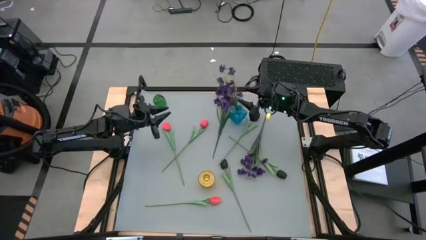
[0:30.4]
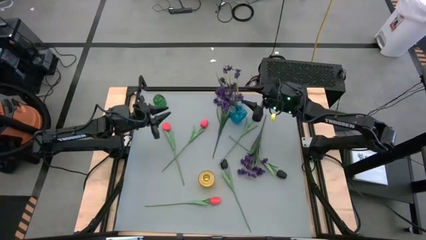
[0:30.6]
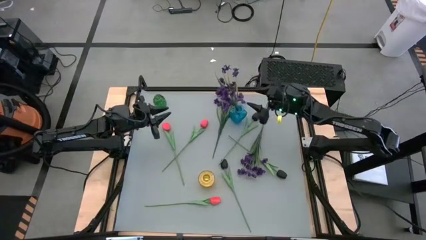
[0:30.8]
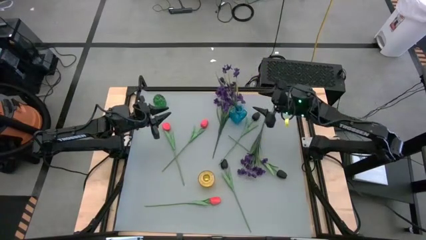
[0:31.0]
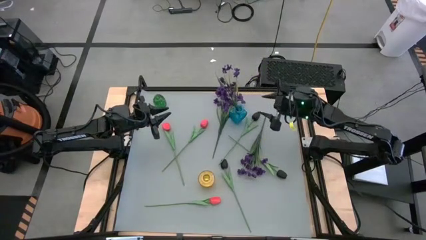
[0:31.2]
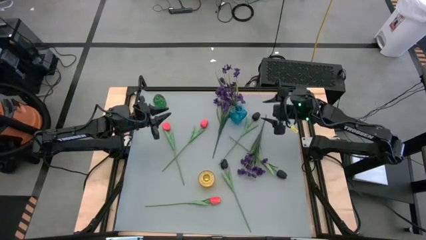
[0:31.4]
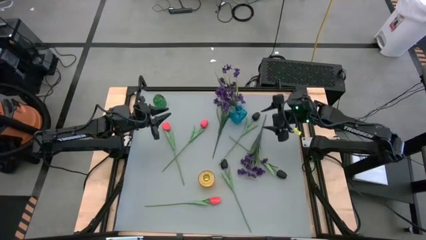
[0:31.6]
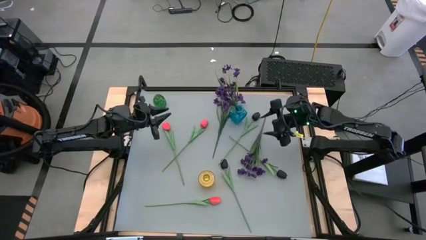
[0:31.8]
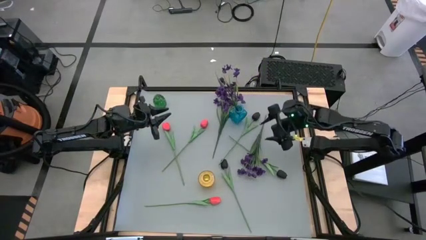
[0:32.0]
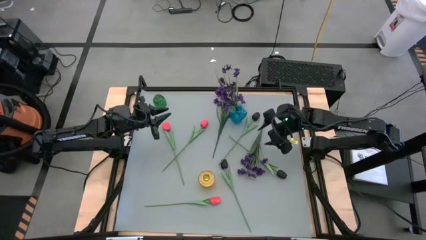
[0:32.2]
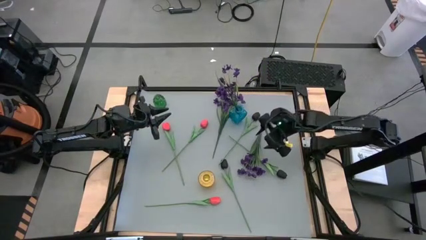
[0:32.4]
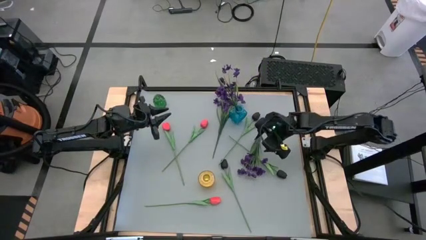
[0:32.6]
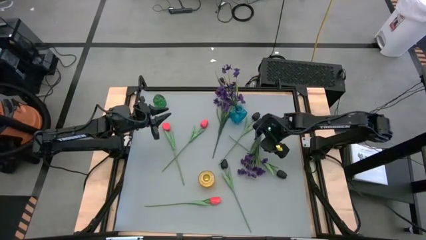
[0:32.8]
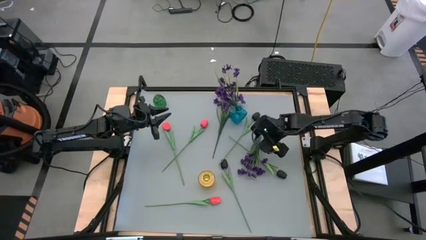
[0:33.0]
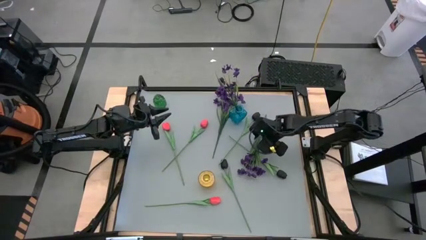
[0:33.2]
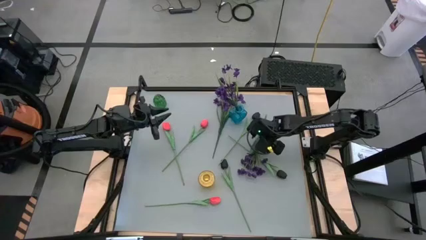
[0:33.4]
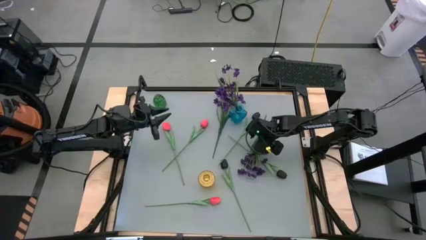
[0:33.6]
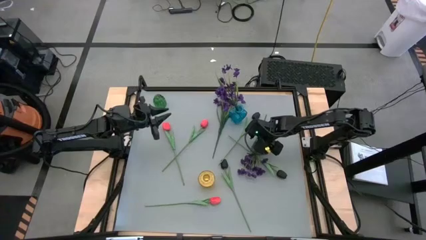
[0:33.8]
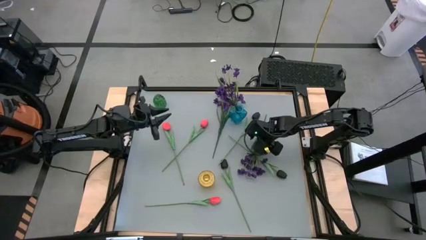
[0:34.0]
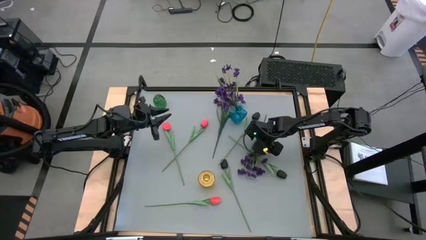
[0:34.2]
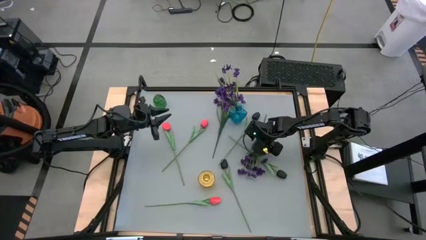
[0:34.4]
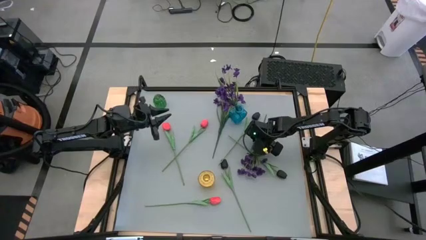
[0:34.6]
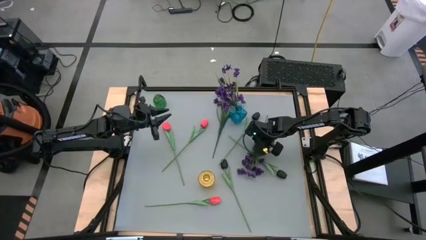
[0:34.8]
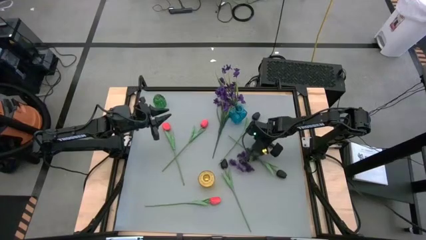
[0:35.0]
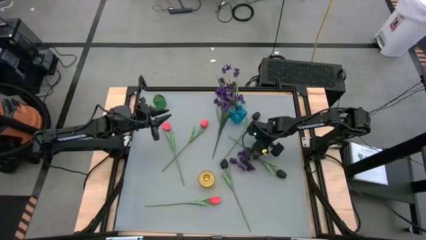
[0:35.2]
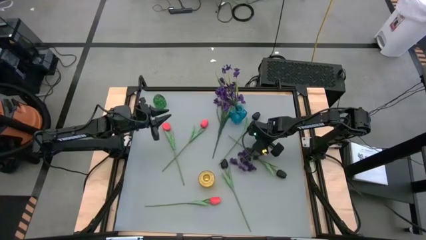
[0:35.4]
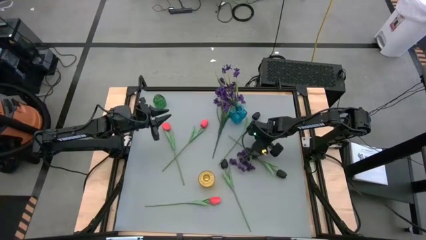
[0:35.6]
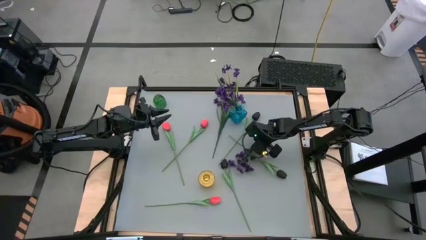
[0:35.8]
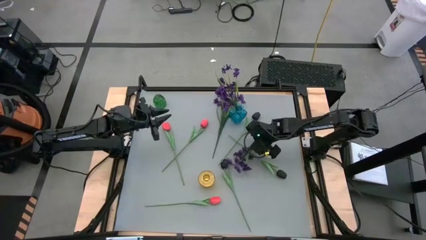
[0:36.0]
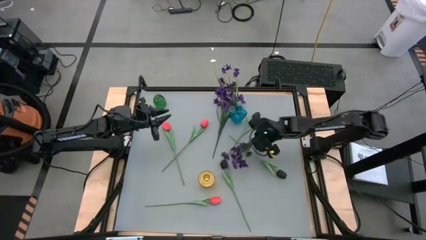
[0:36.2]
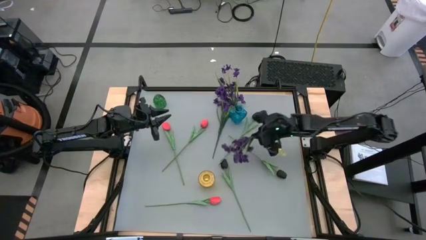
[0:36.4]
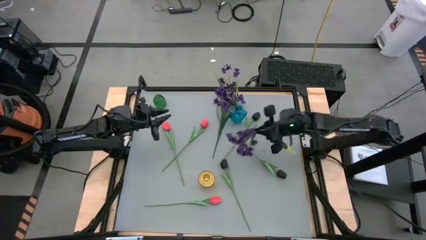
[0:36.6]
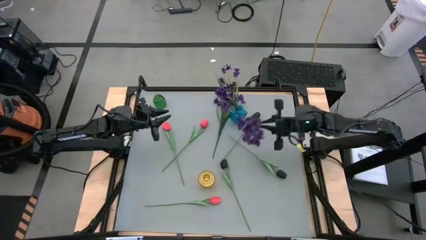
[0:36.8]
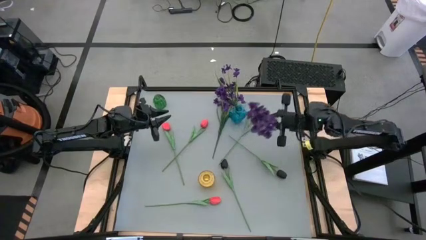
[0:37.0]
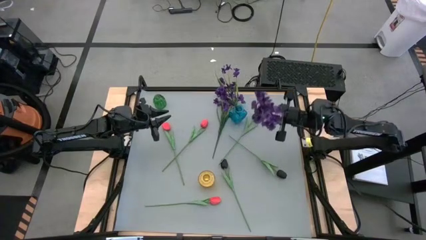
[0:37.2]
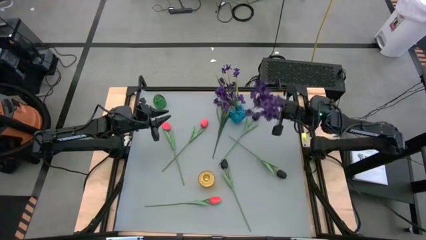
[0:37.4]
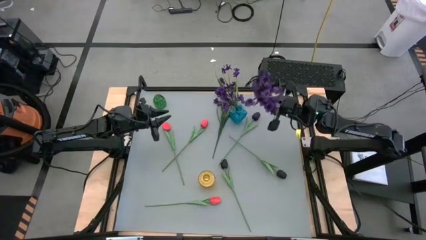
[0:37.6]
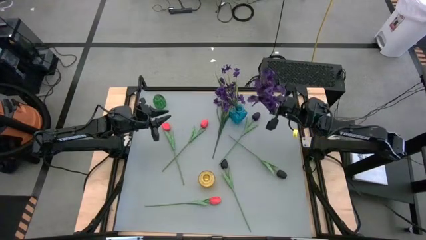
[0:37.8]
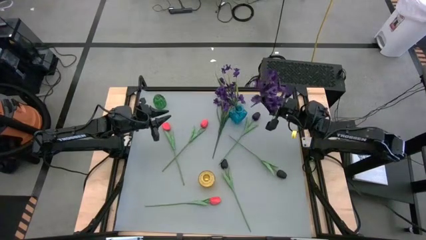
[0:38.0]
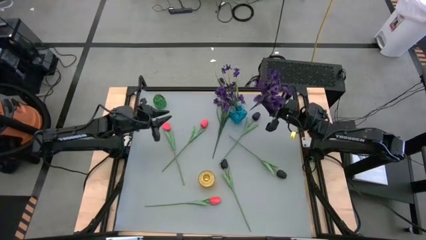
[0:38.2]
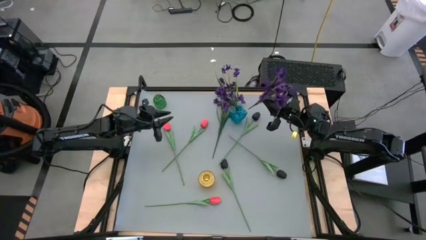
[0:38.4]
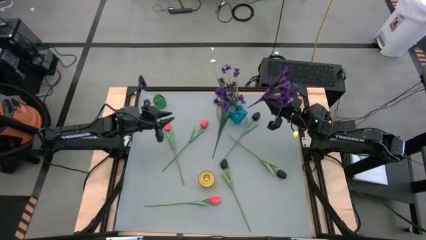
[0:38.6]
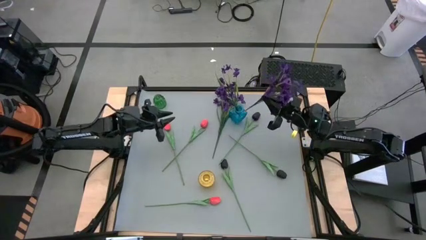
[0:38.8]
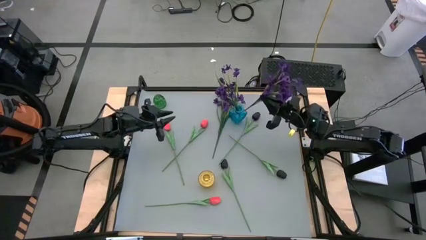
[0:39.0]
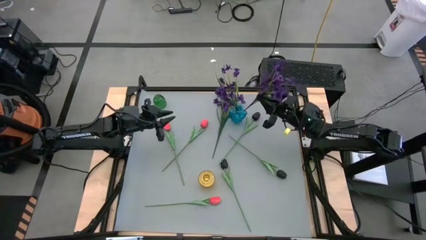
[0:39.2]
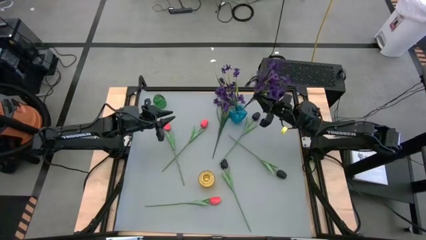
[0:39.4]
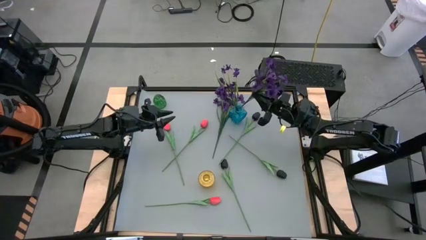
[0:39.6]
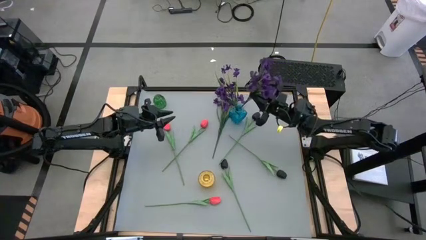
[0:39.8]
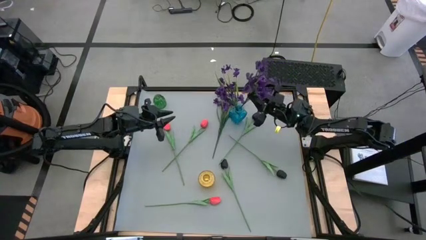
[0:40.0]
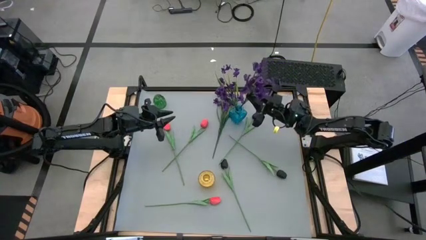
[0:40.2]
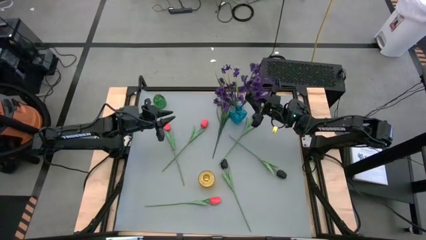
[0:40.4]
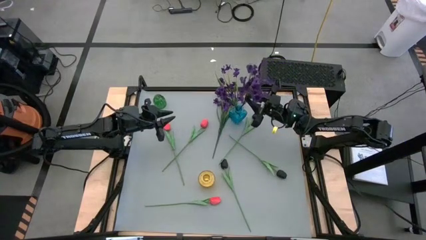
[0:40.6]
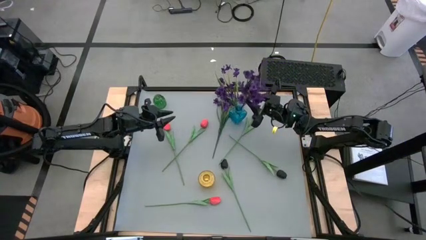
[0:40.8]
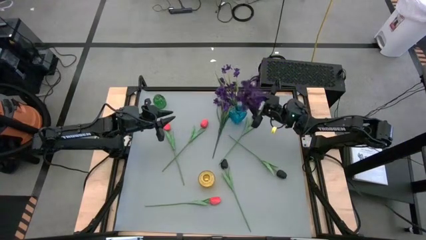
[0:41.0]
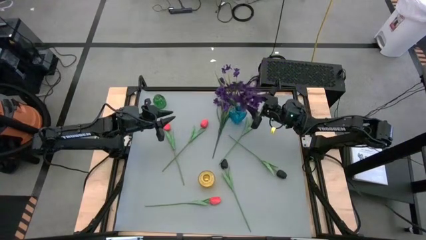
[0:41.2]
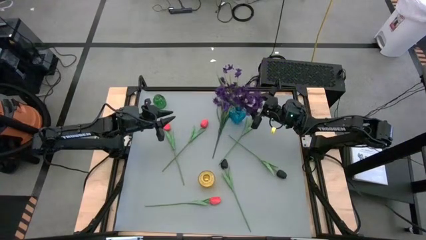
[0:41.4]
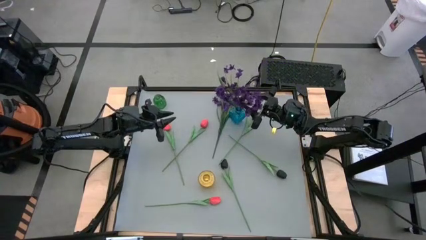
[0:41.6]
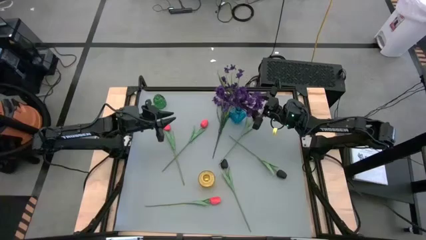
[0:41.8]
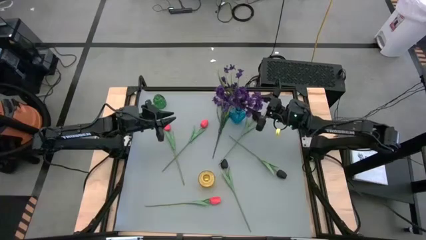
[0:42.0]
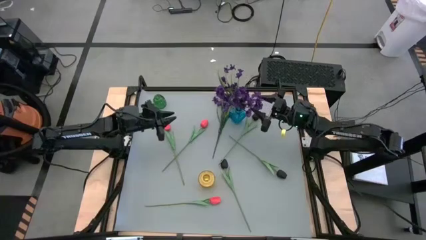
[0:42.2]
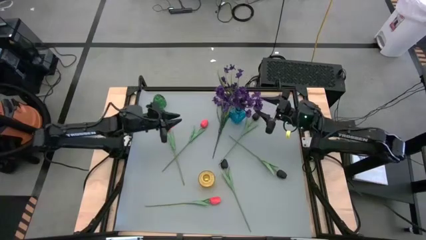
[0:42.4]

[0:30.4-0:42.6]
Task: Sort flowers into vase by color
Put the right purple flowers into the blue vase

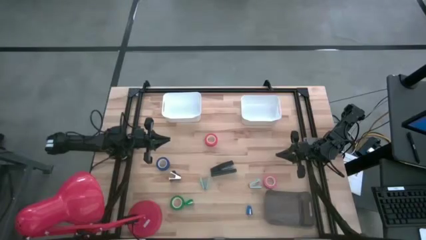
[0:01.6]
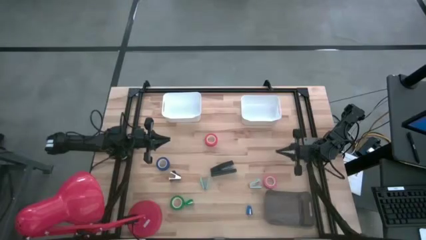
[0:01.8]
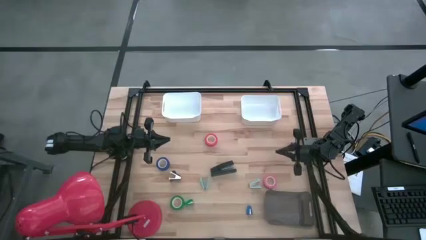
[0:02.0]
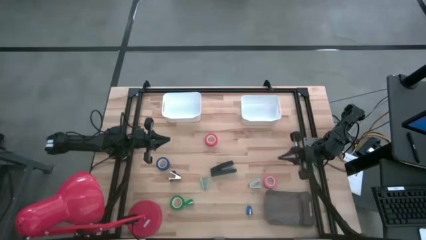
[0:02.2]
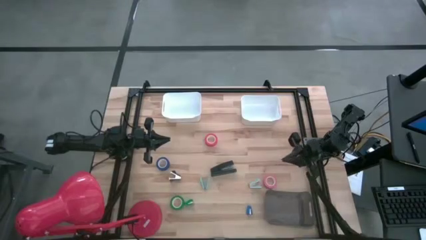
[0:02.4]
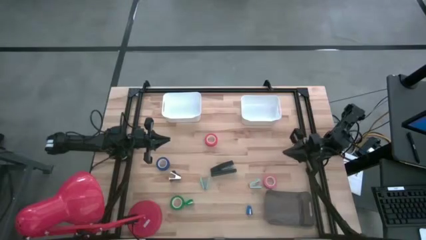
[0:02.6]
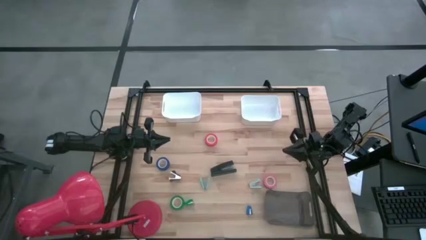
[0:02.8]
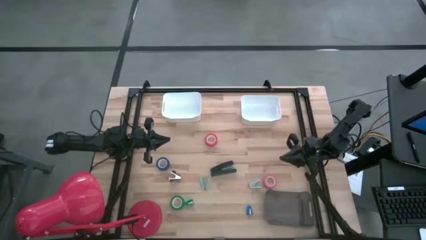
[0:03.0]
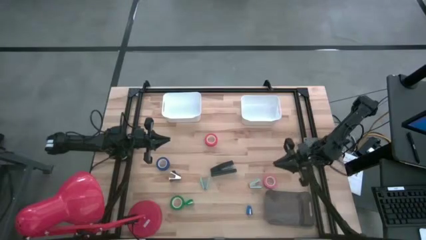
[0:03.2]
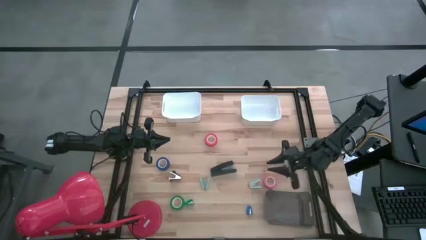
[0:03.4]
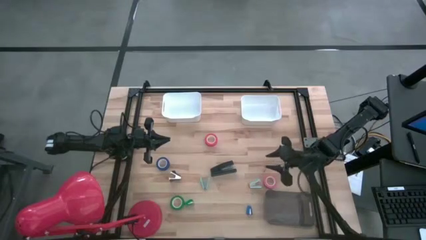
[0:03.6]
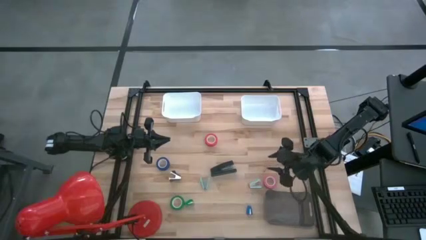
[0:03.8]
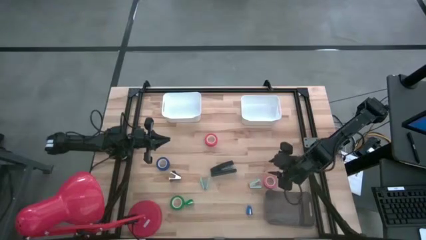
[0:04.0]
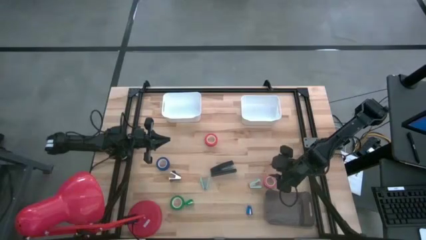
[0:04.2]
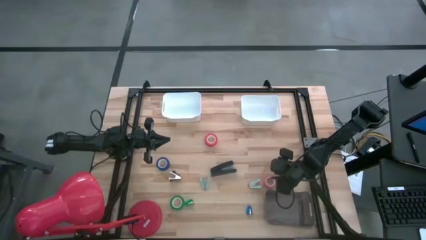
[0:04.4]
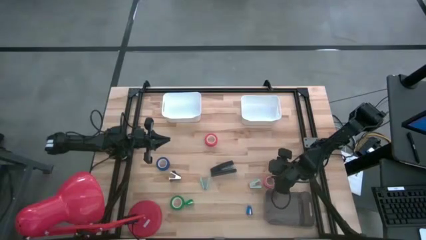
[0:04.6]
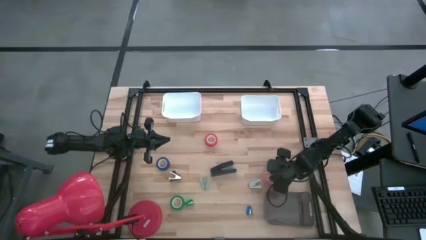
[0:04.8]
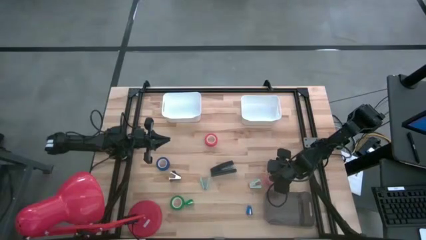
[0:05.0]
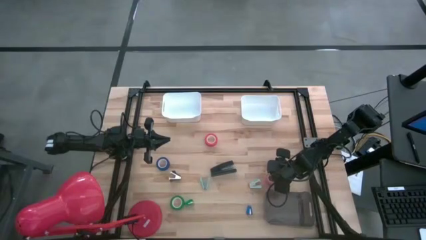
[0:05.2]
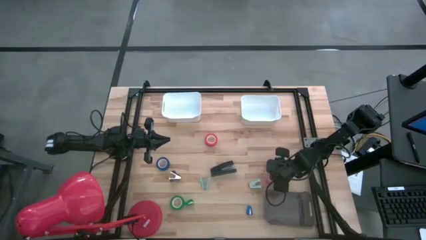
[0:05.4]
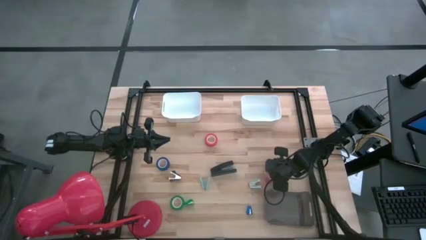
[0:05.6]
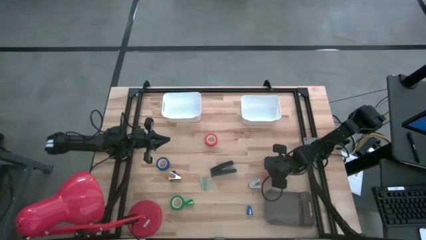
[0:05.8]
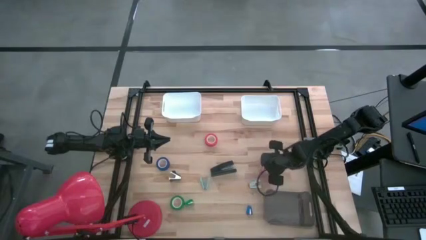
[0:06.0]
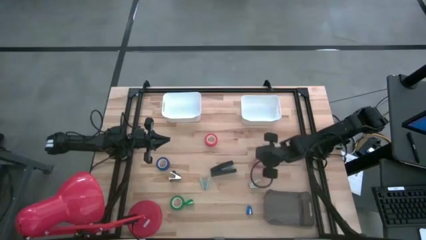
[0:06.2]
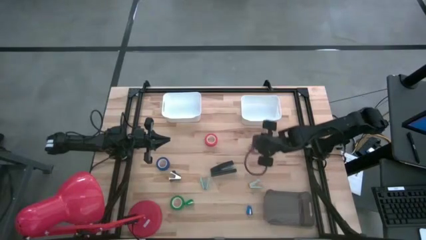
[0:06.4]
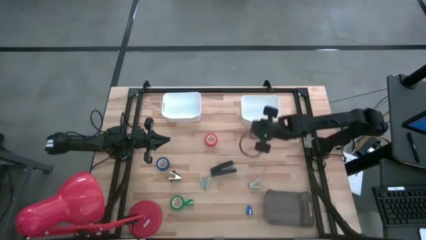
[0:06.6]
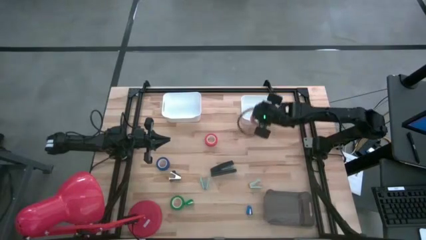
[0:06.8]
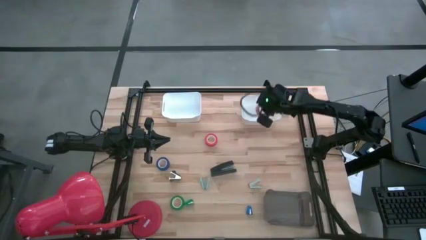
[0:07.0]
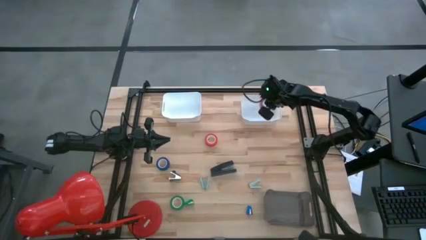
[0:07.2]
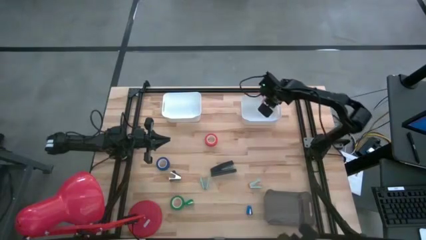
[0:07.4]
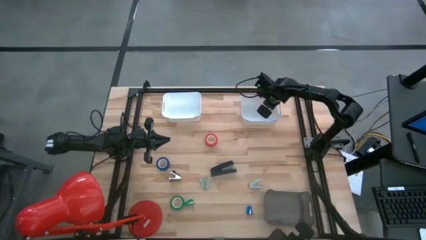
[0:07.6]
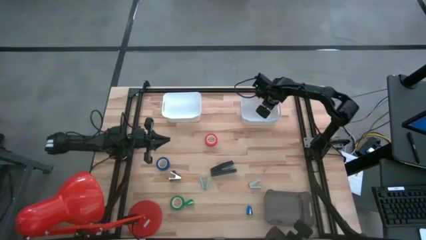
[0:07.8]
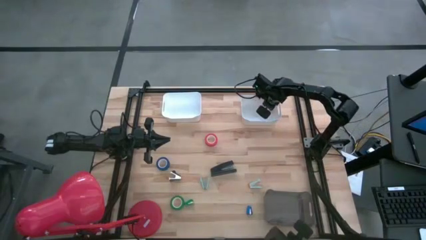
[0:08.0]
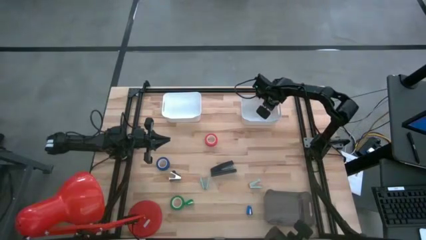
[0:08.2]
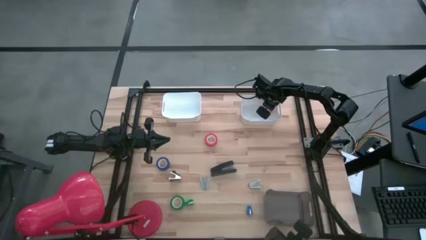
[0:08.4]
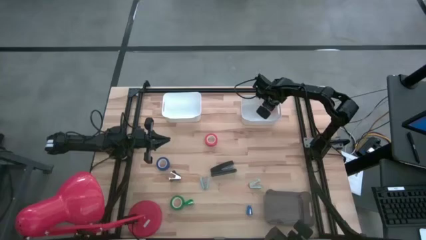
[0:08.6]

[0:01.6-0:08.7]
Task: Pick and place Stapler, Stapler remover, tape
Put the pink tape into the right white bin
